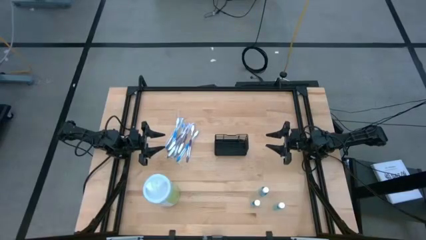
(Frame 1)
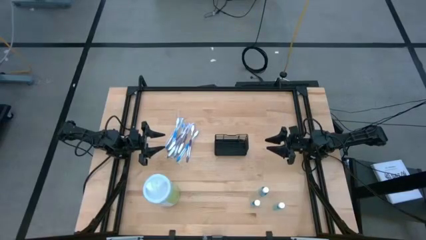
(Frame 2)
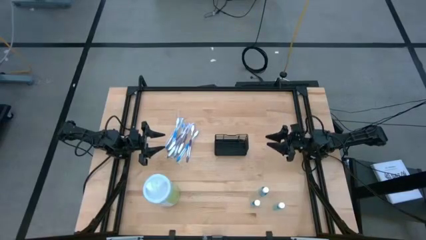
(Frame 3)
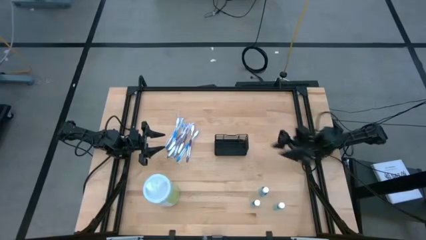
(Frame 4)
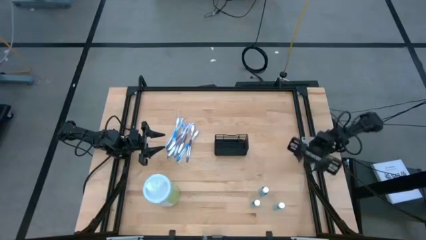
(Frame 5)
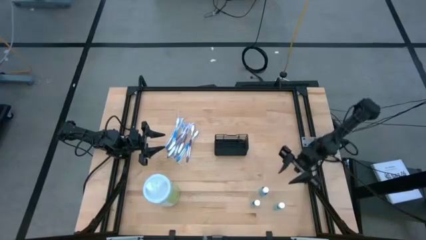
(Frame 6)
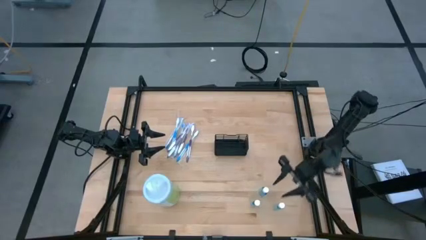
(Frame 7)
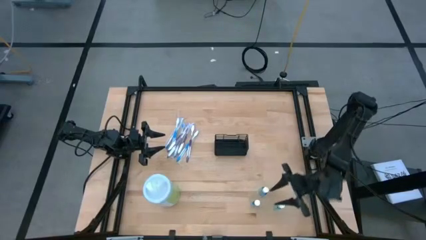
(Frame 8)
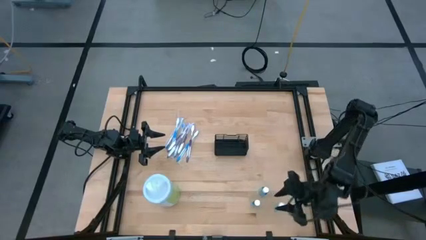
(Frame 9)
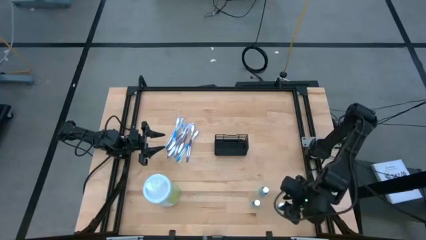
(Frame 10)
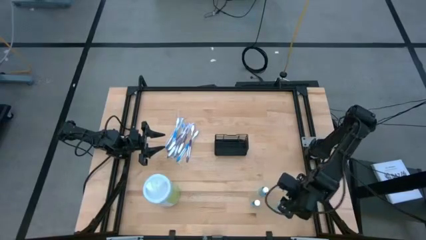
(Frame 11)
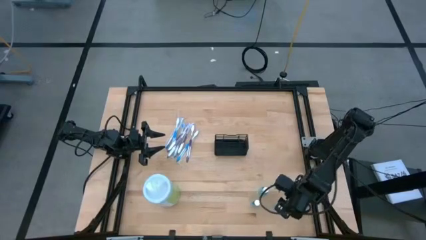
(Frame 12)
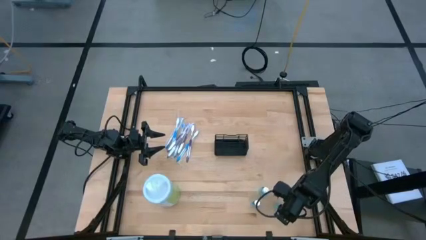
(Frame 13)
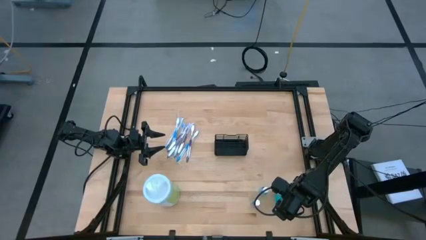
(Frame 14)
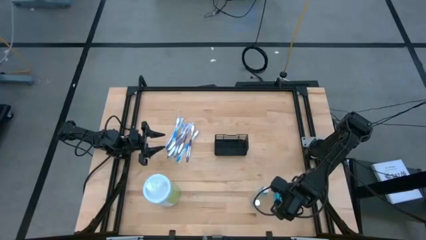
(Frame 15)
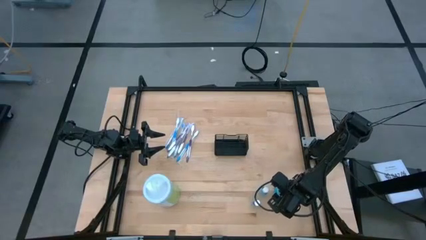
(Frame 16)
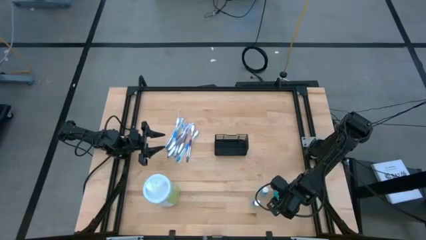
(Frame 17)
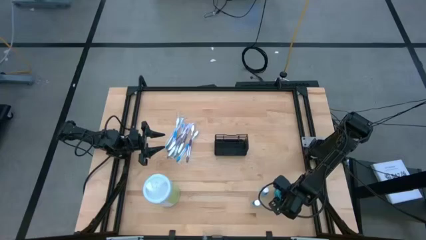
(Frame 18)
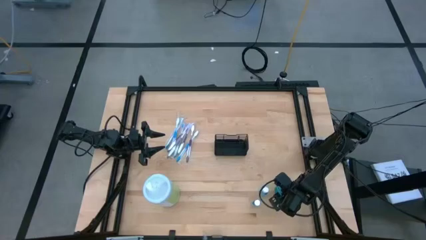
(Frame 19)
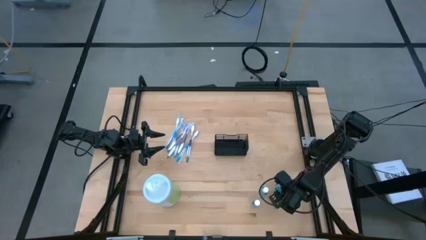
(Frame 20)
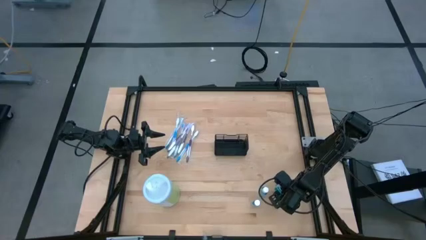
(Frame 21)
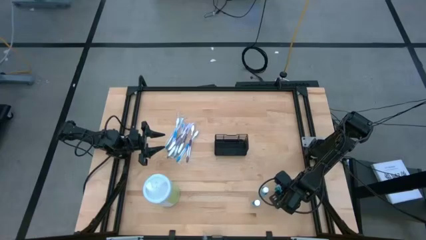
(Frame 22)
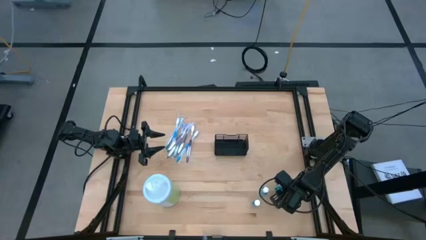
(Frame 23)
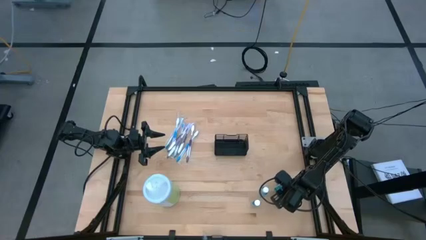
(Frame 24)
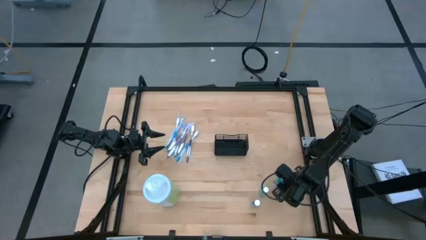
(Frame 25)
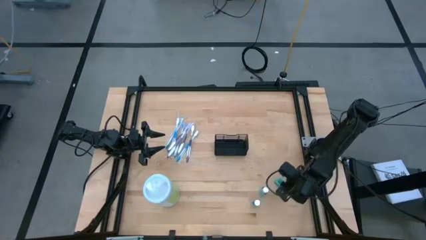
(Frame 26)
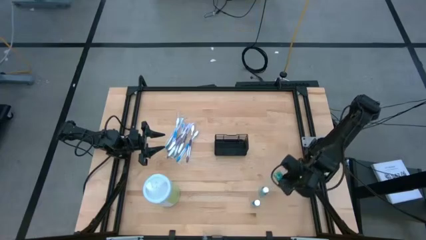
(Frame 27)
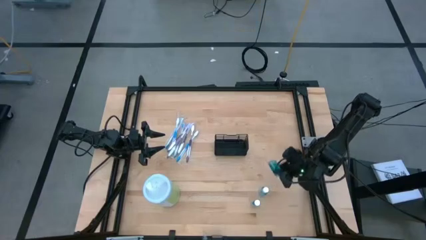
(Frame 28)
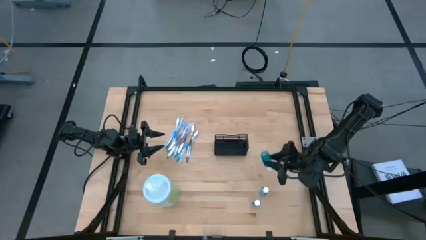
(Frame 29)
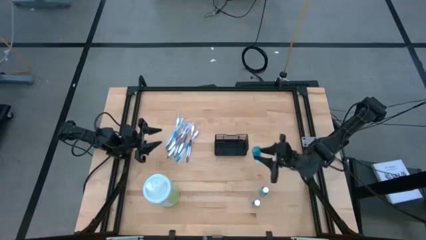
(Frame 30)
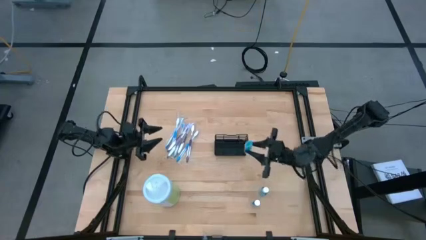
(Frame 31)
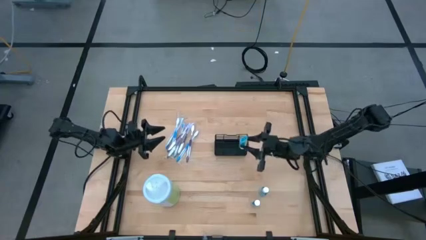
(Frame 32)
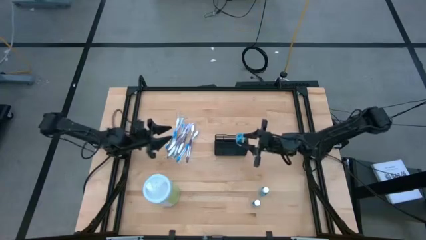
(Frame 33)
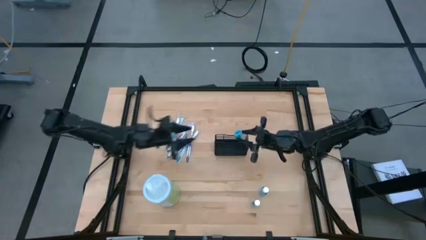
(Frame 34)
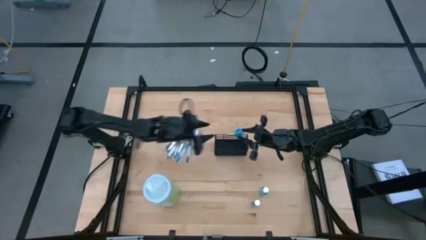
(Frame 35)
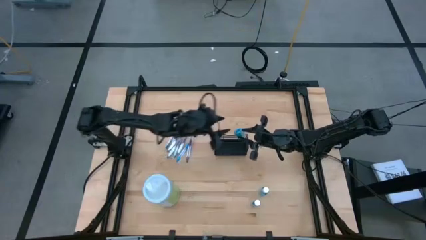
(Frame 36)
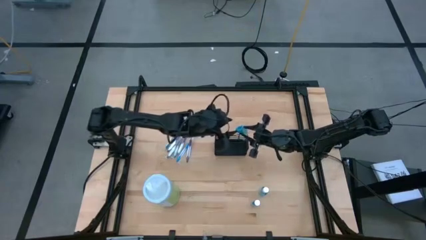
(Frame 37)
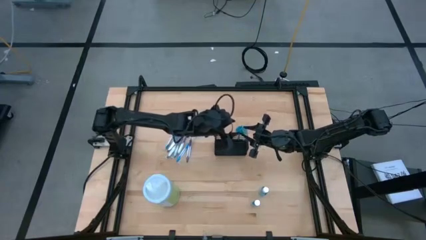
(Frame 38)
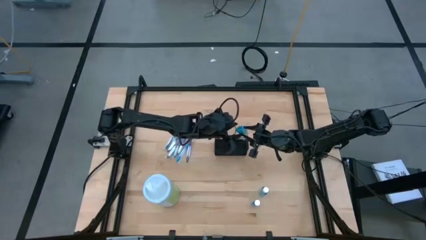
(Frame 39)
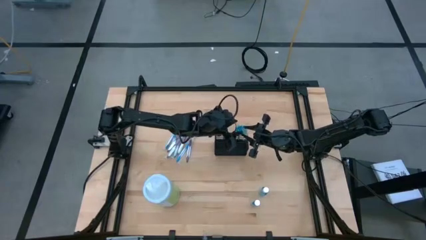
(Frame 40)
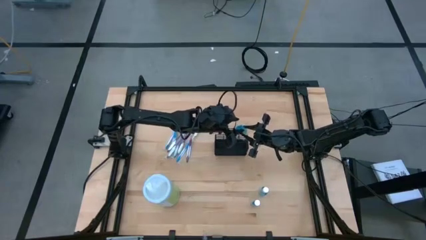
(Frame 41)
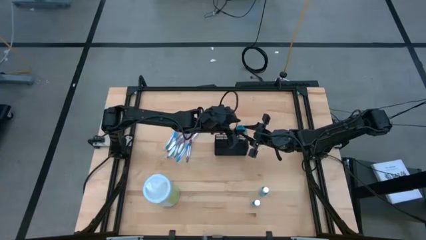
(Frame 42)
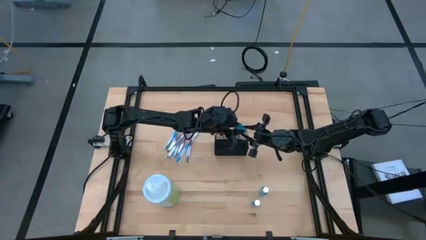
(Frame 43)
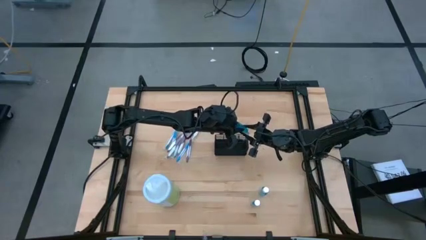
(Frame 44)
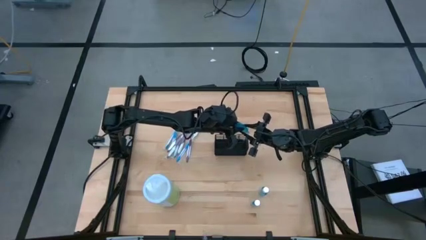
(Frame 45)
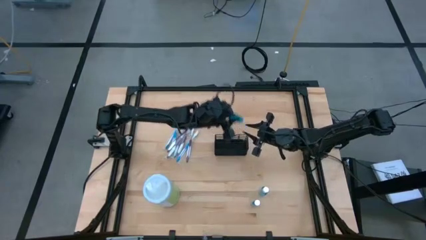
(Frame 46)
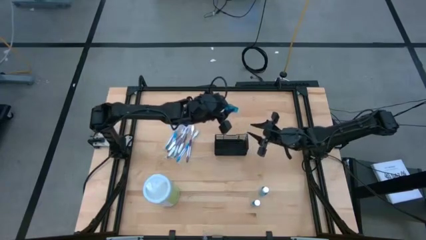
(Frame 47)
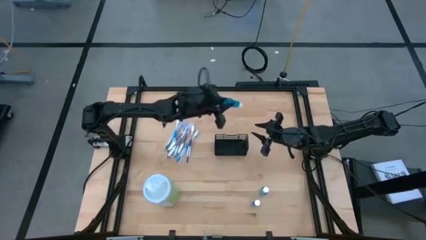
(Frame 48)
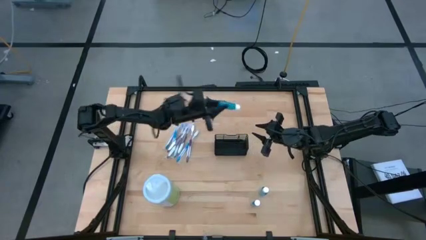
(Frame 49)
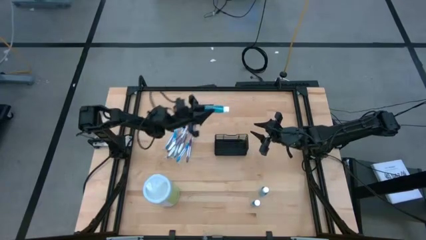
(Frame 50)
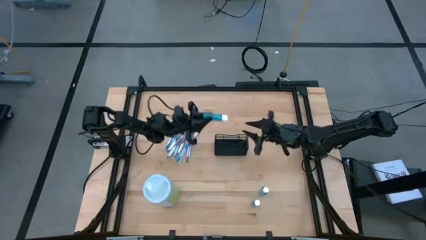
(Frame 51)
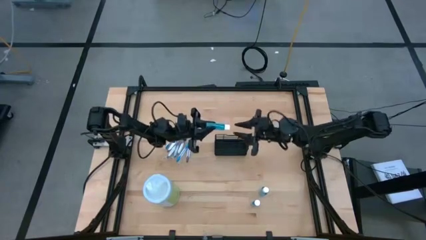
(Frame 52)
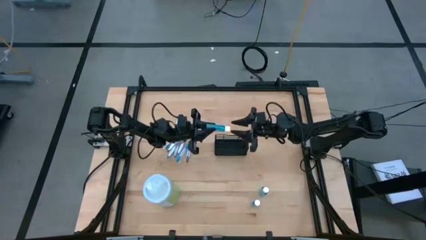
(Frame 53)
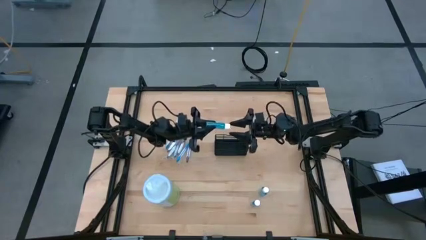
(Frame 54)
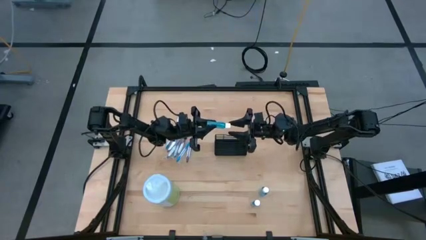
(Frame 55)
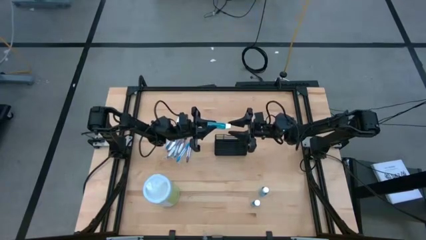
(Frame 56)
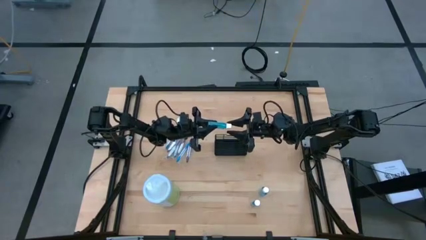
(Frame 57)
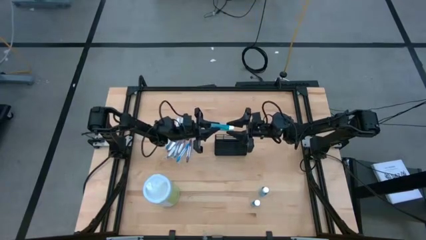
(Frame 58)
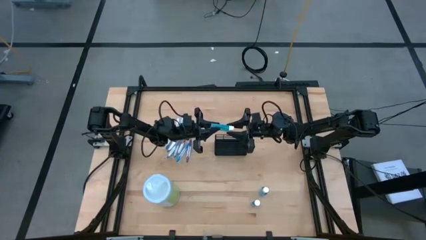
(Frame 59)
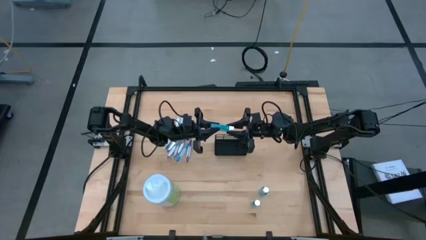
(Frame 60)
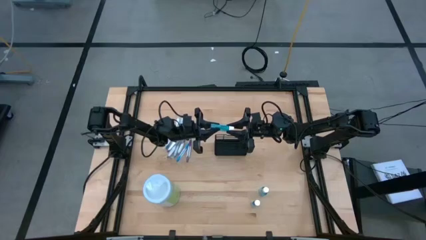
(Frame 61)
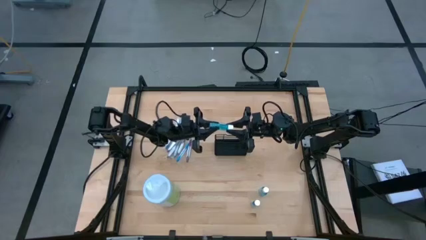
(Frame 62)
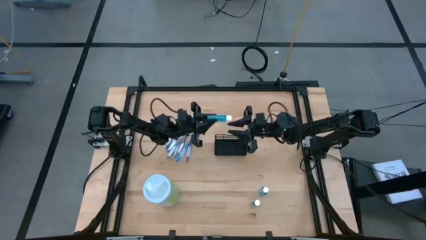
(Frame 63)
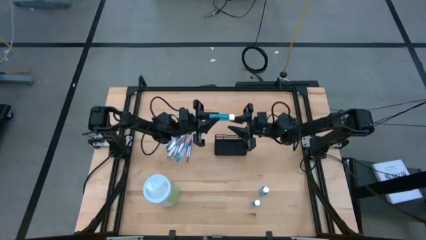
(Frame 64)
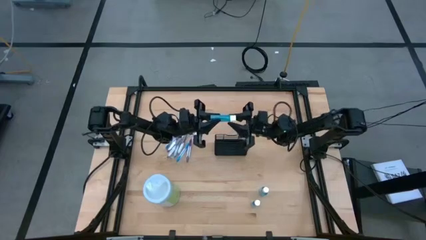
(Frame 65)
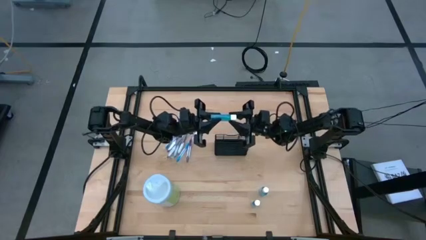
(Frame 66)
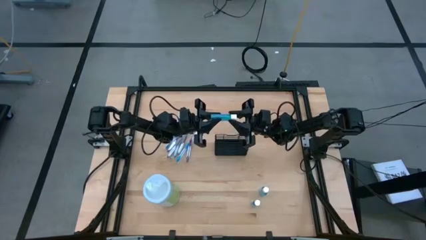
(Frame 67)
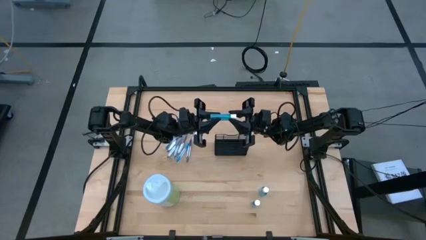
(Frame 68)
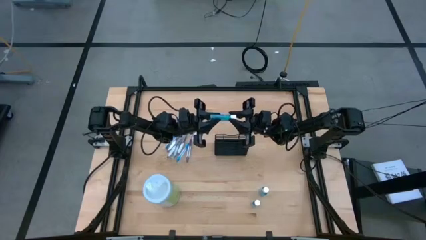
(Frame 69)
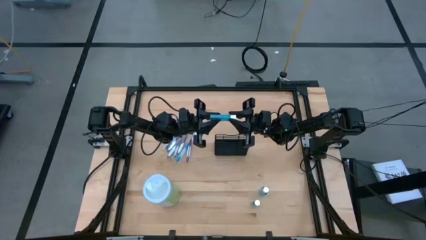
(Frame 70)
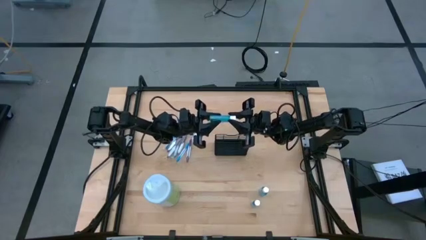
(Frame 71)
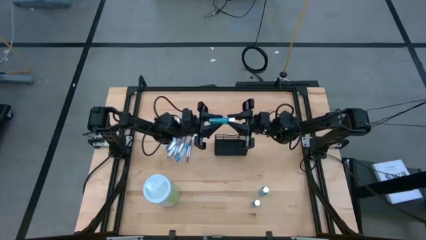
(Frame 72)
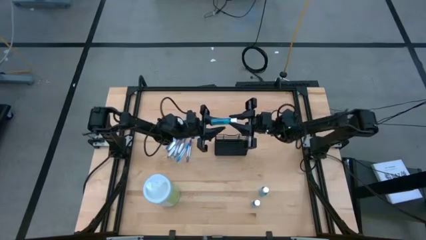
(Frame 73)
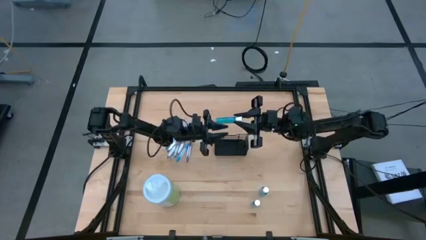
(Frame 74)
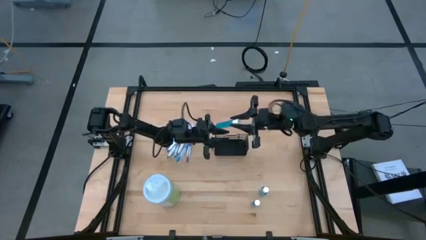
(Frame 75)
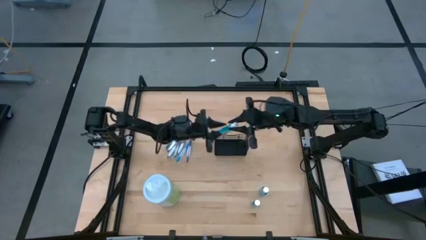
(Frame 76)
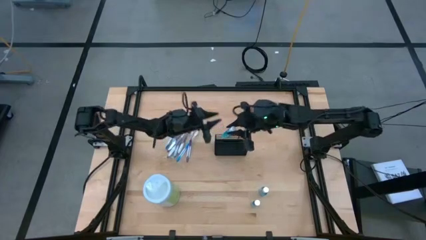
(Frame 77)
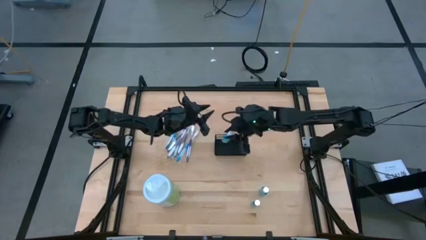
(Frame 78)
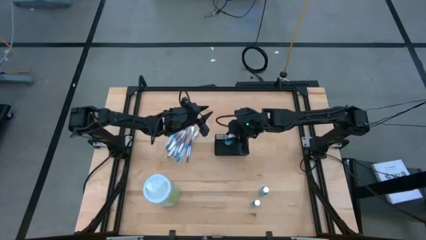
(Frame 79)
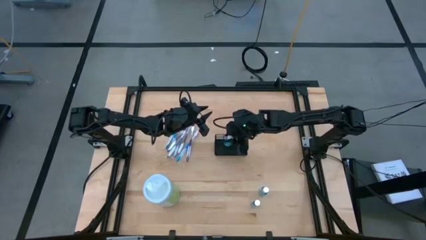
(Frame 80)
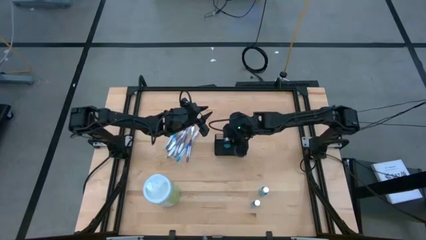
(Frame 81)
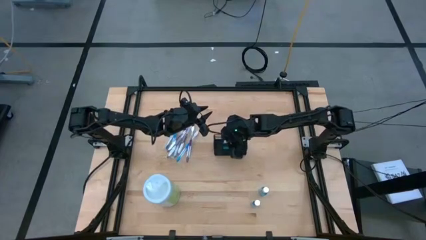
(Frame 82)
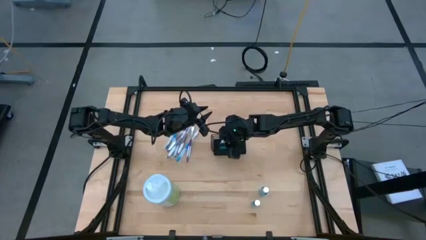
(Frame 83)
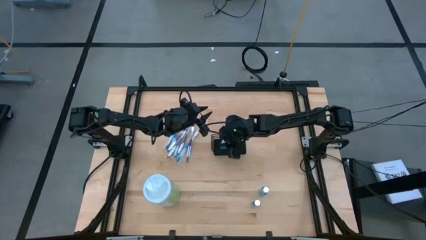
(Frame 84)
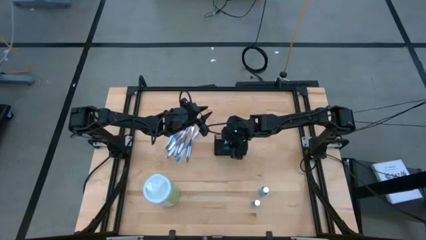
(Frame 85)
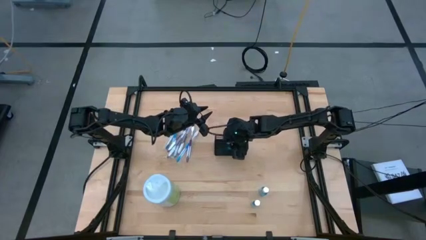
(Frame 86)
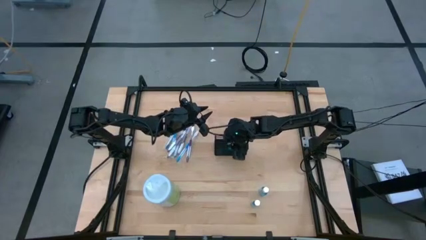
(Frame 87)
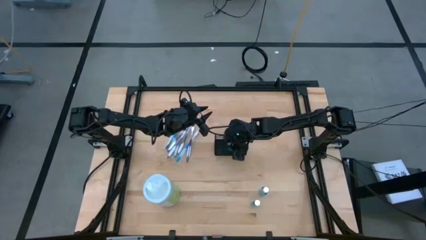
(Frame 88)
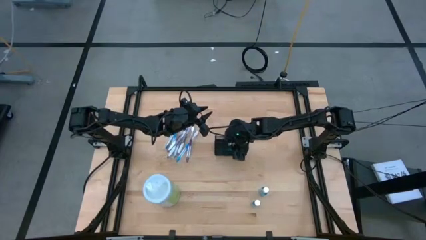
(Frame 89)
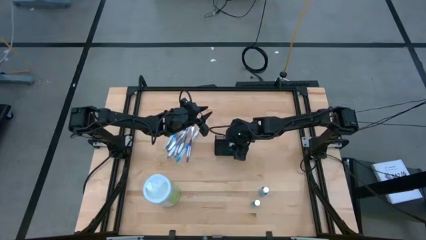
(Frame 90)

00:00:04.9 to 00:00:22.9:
Task: Pick & Place toothbrushing station
Put the blue mouthwash into the black mesh organizer
